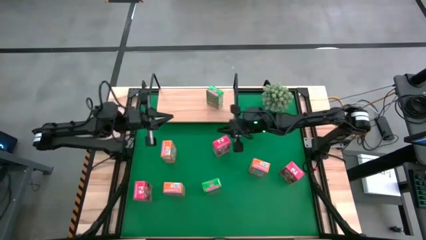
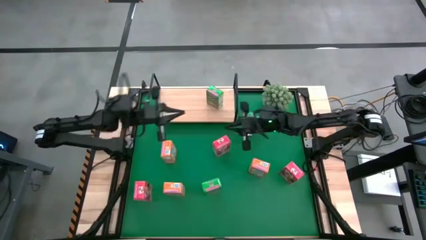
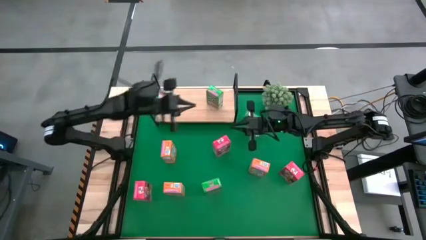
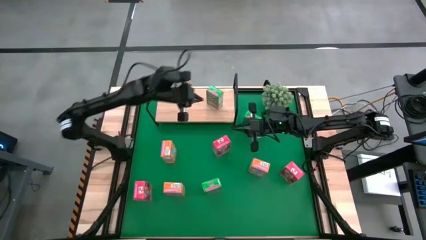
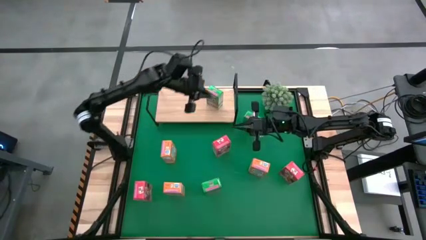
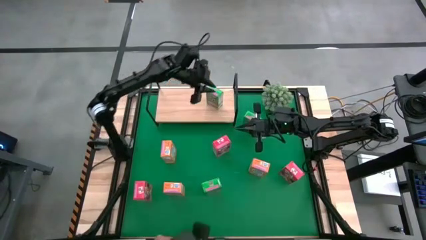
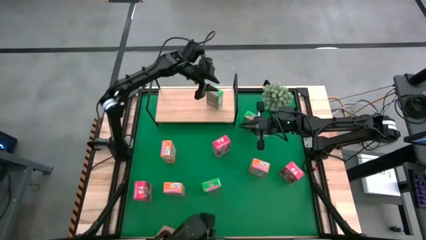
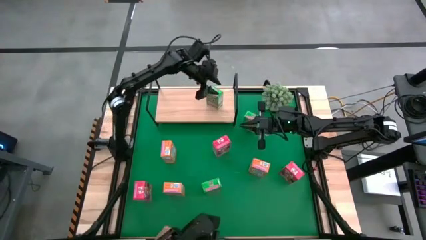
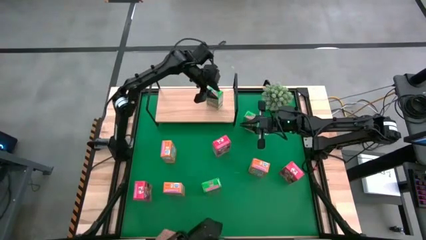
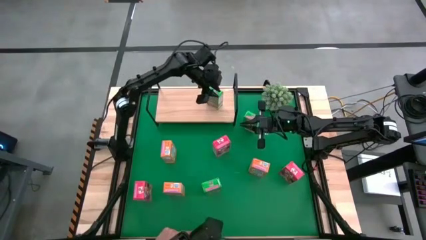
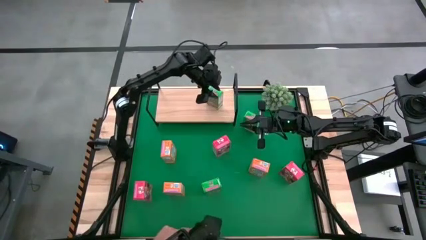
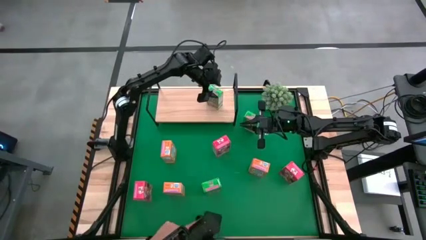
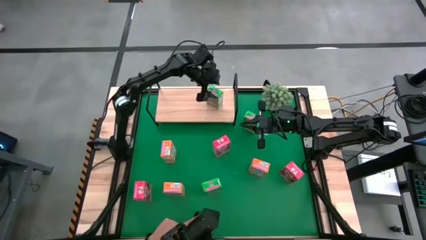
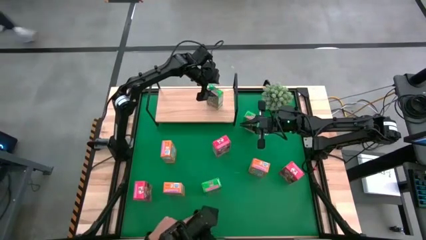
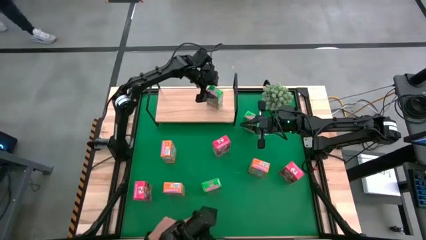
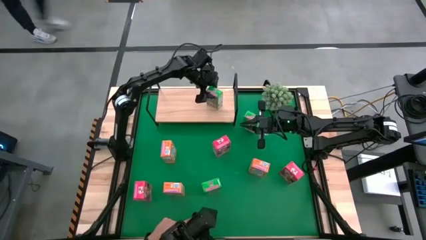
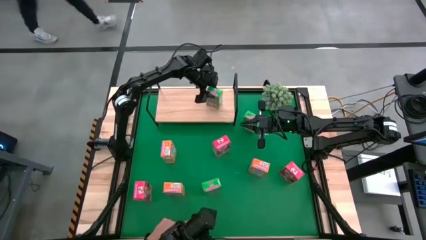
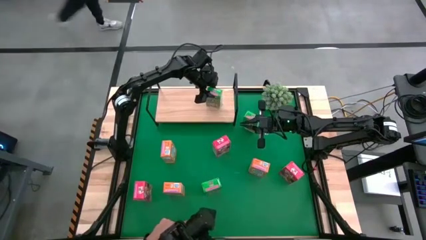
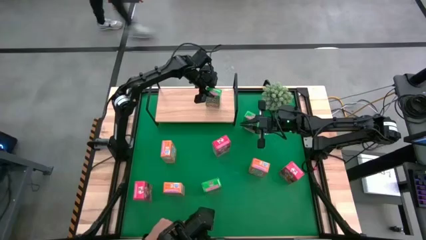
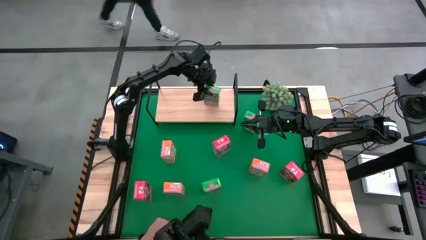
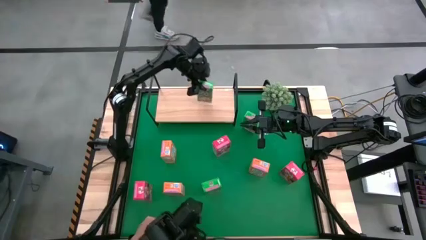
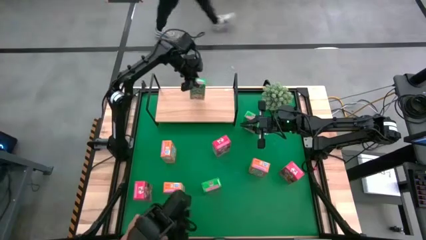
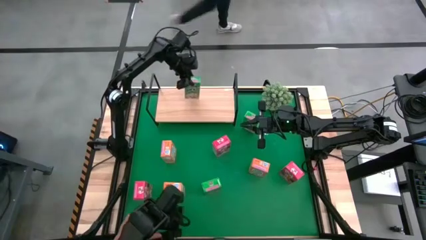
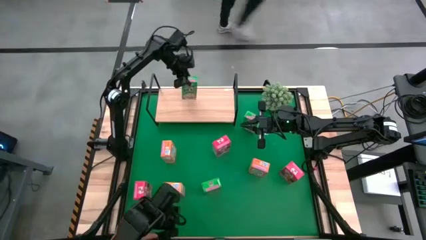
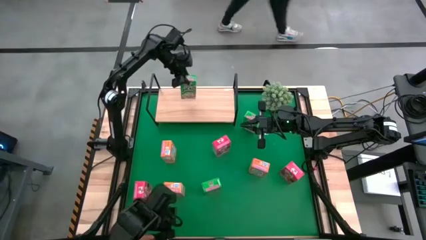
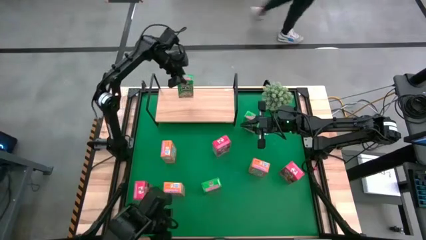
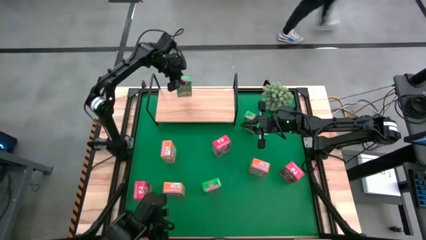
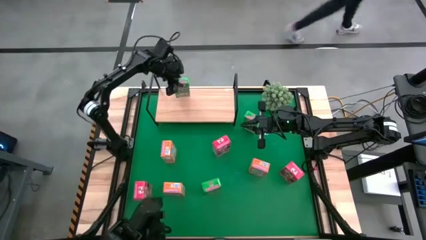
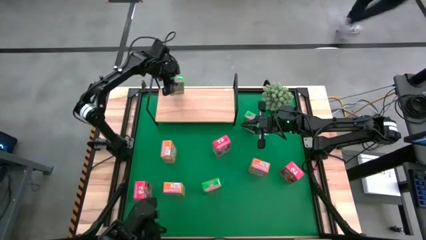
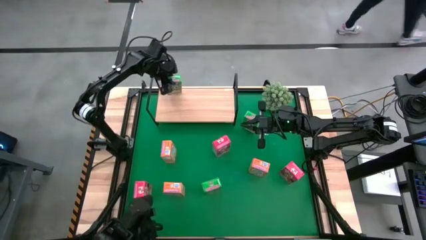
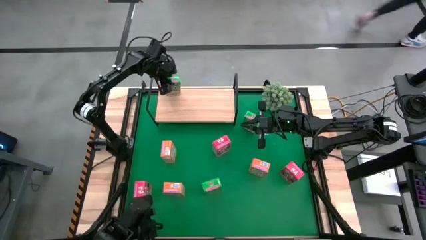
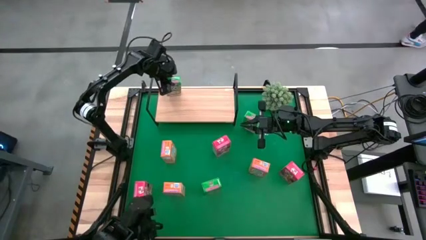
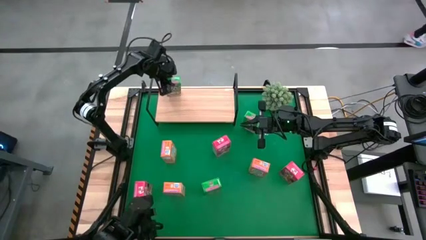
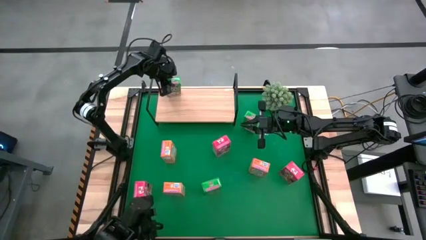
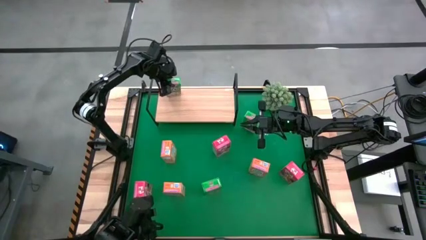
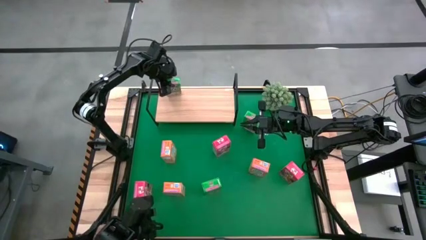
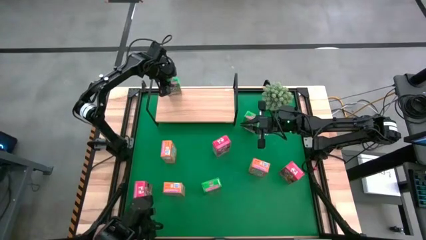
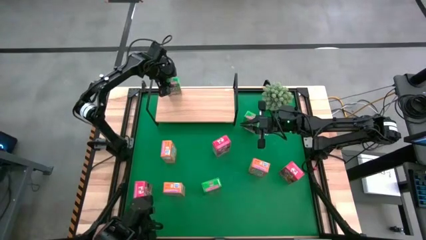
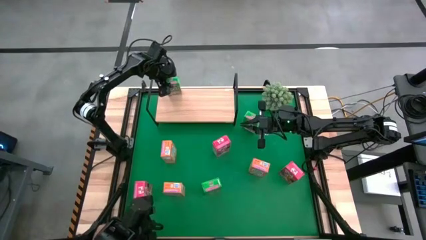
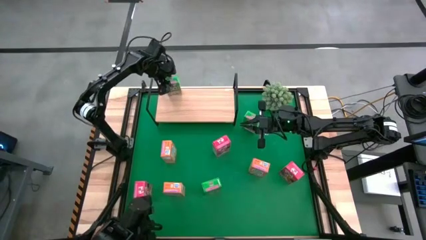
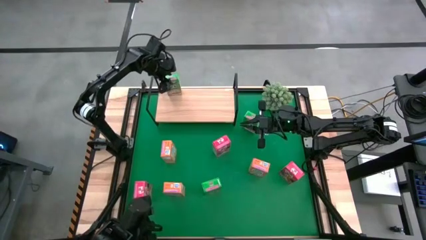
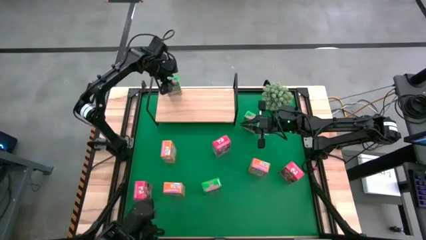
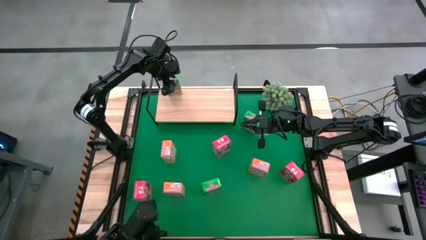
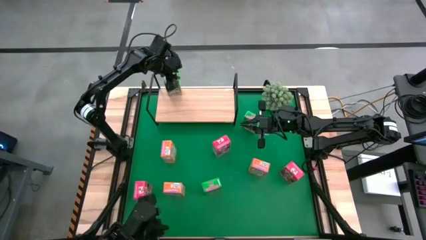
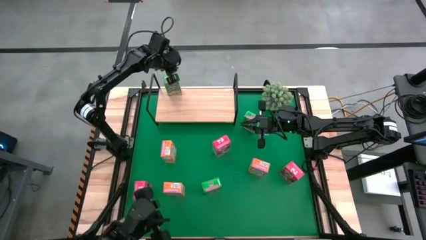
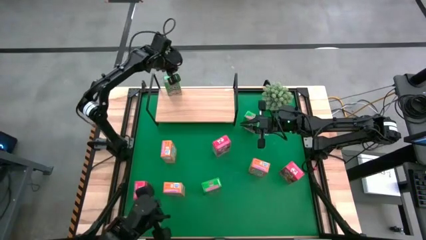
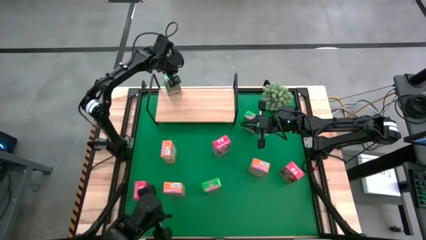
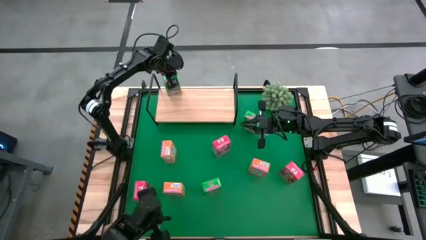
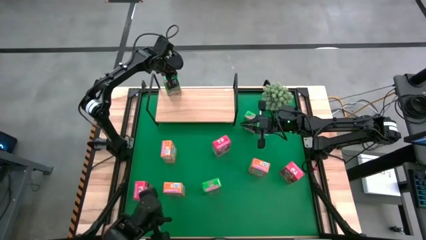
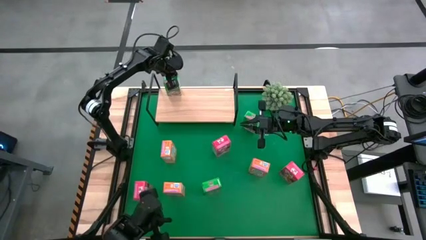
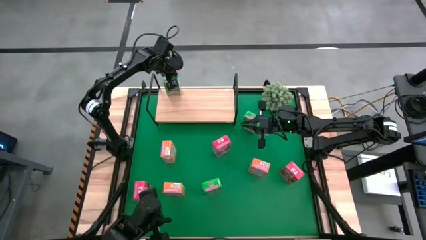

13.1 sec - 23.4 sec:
Task: Stack cereal on shelf
Put the middle right green cereal box on the shelf

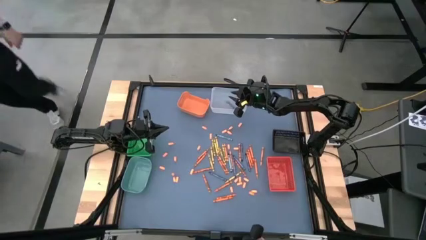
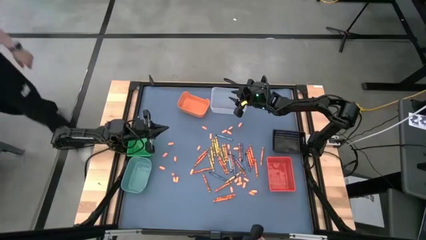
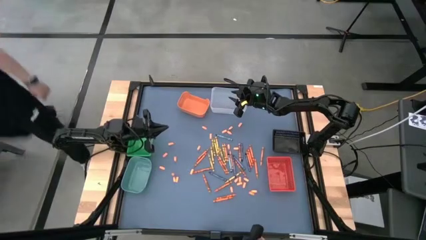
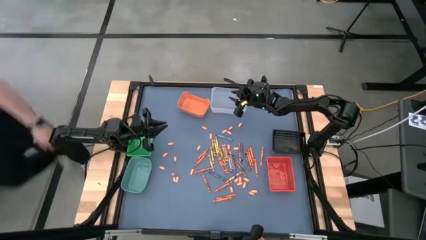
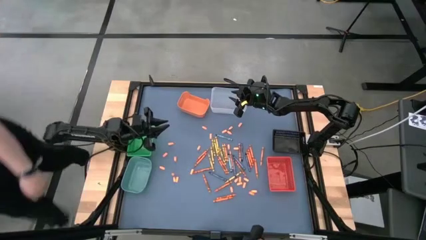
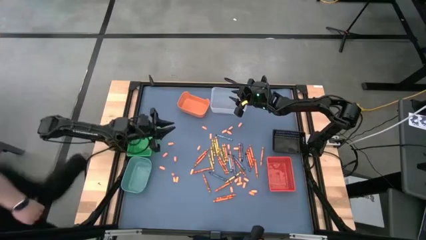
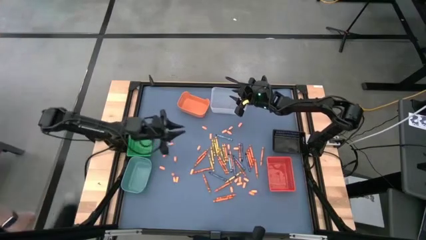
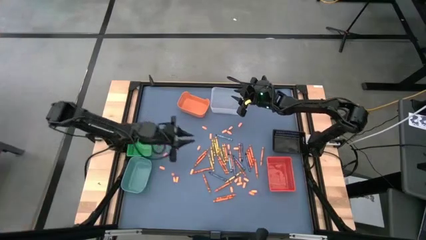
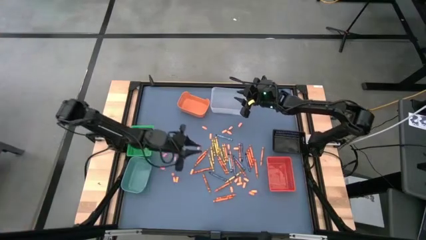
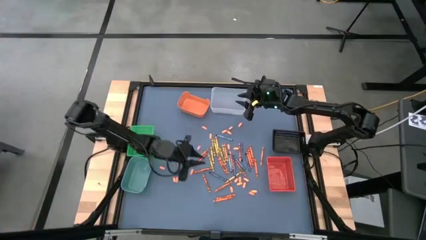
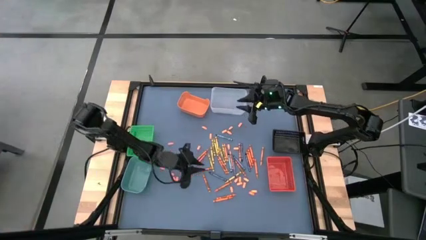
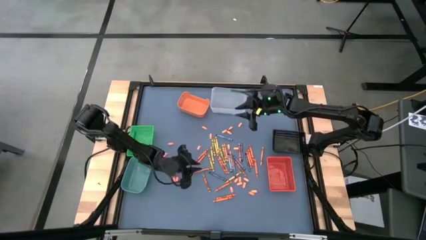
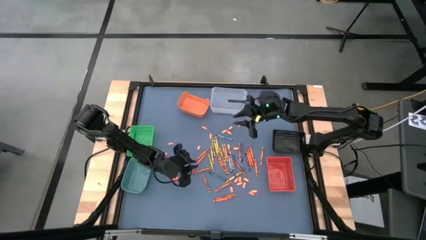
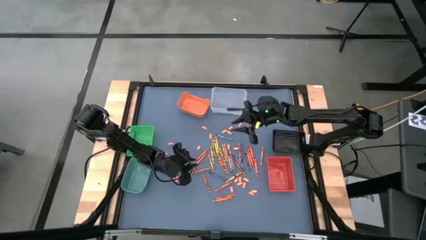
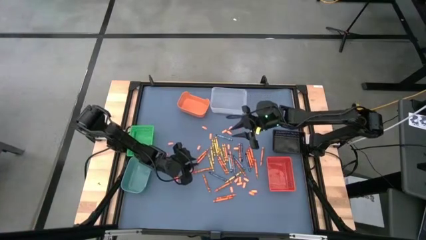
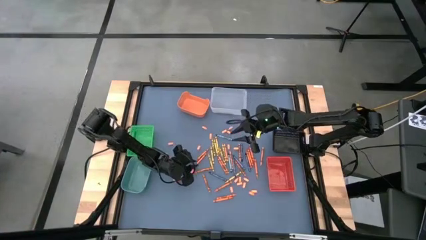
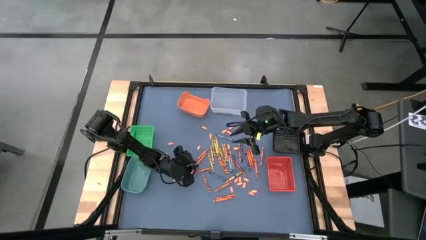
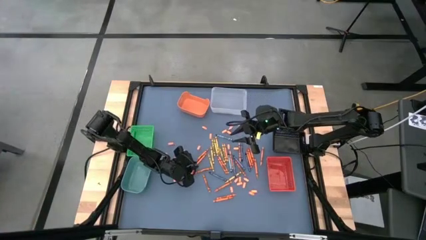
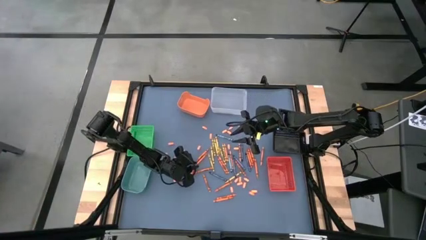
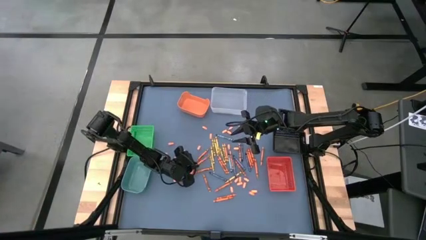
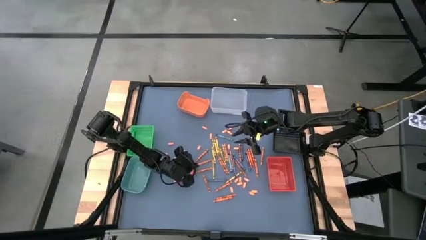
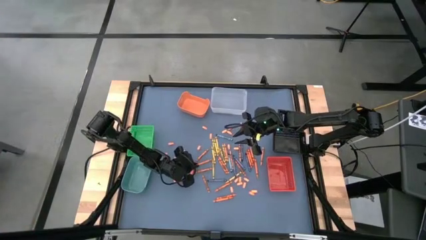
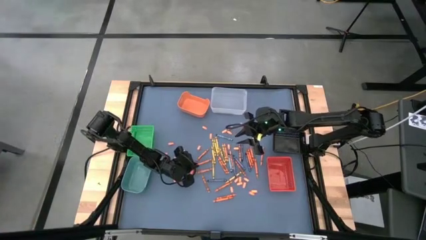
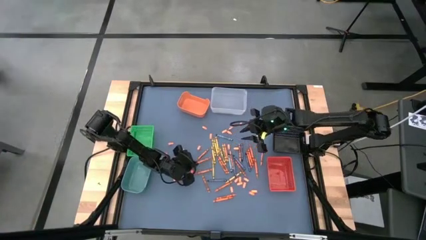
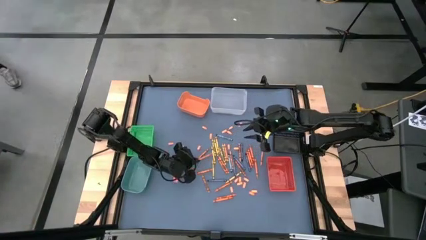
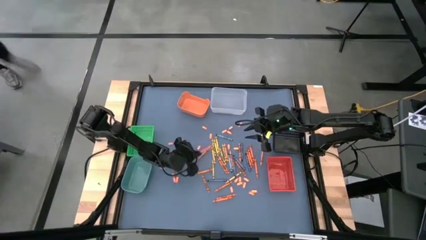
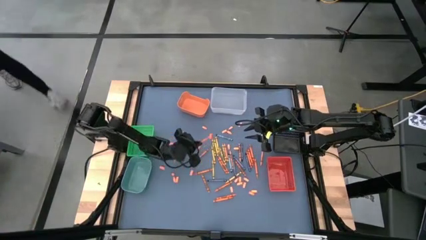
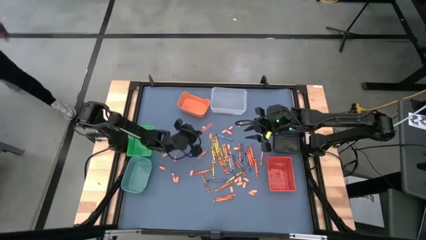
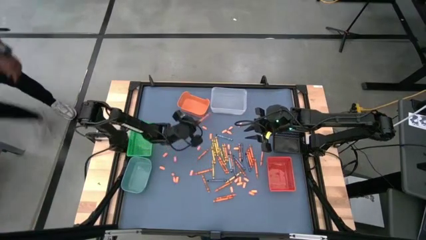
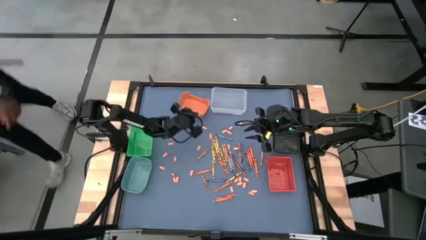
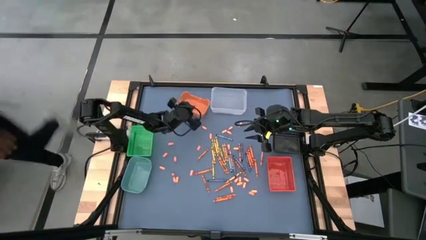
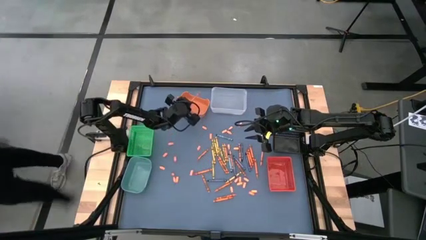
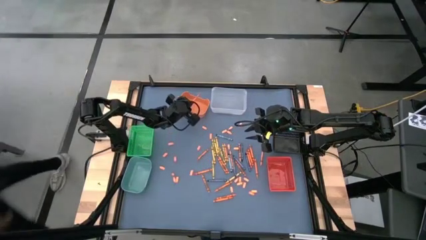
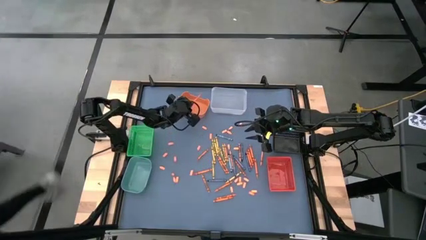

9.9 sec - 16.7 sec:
Task: Sort crayons
Put the red crayon into the orange bin
